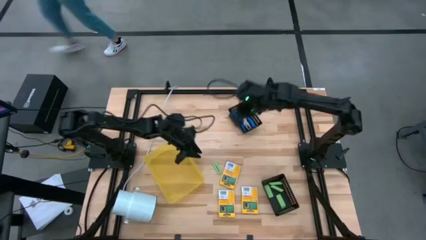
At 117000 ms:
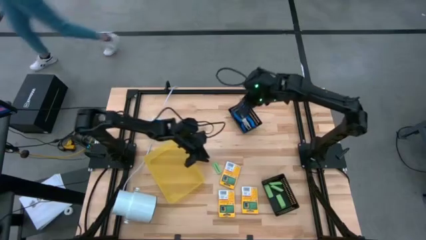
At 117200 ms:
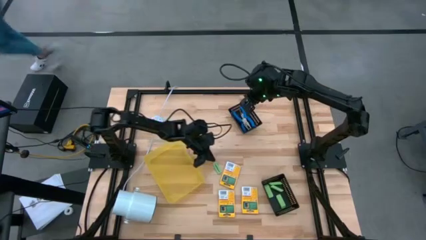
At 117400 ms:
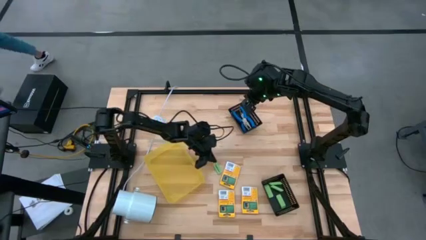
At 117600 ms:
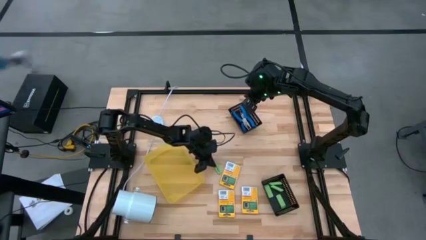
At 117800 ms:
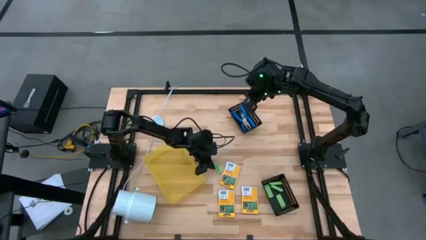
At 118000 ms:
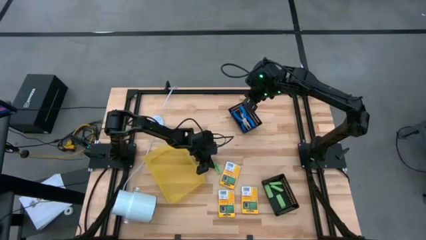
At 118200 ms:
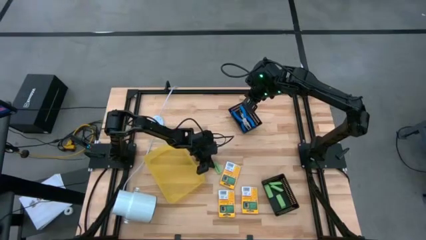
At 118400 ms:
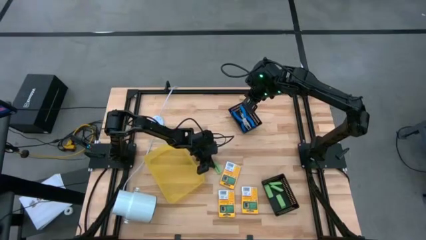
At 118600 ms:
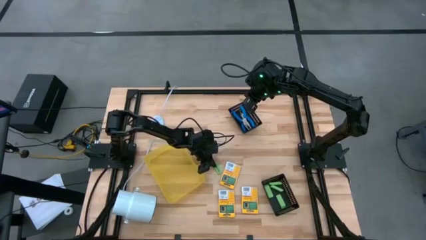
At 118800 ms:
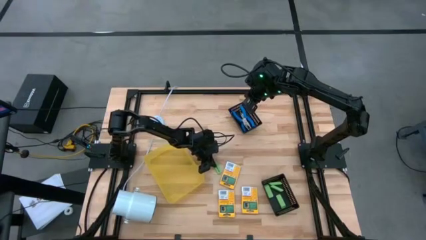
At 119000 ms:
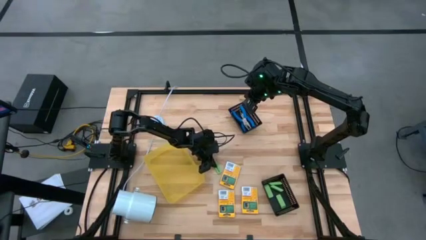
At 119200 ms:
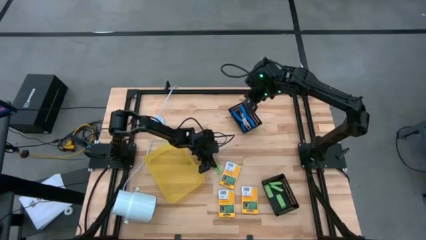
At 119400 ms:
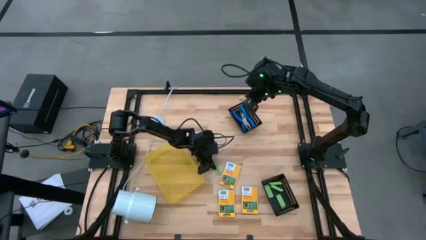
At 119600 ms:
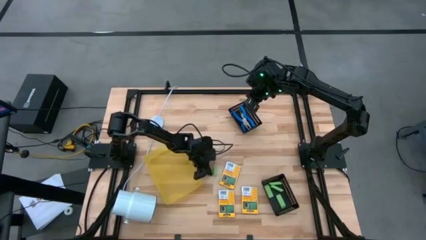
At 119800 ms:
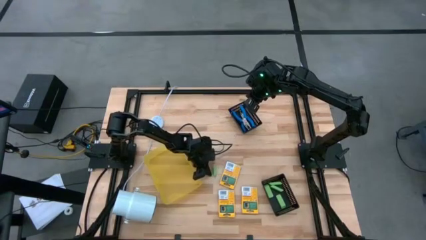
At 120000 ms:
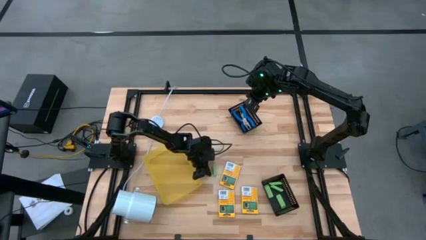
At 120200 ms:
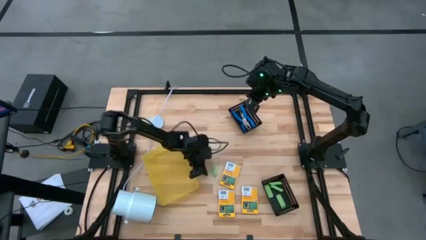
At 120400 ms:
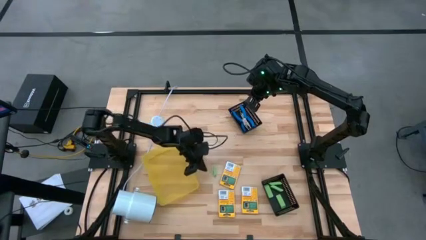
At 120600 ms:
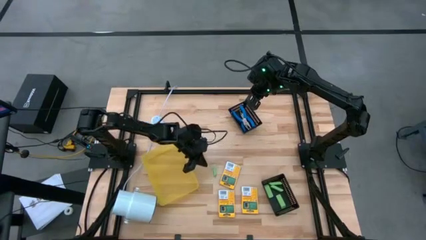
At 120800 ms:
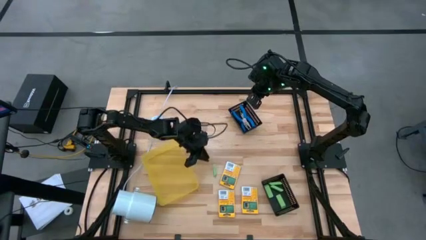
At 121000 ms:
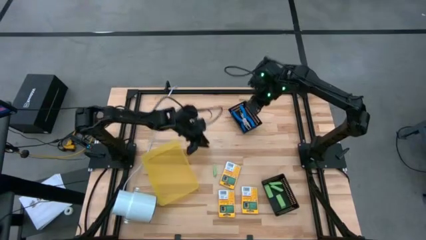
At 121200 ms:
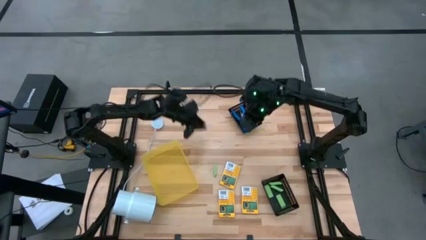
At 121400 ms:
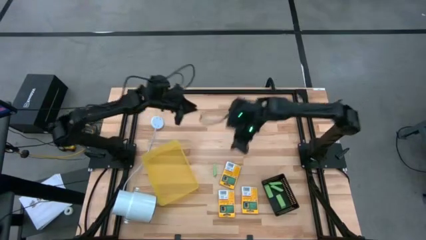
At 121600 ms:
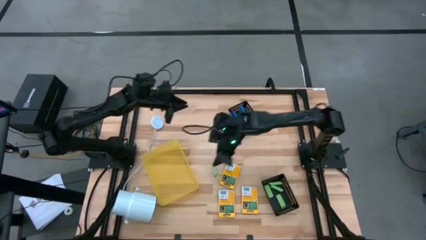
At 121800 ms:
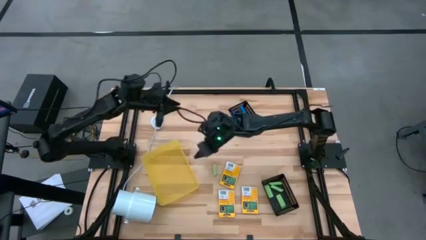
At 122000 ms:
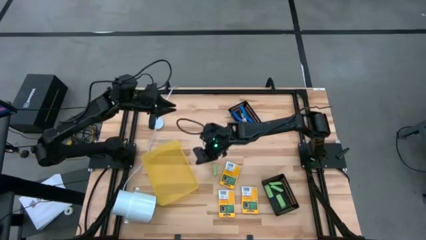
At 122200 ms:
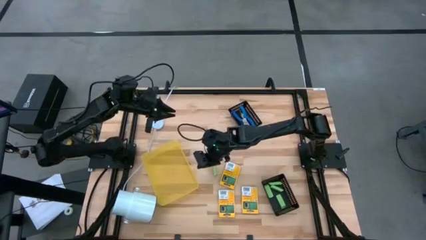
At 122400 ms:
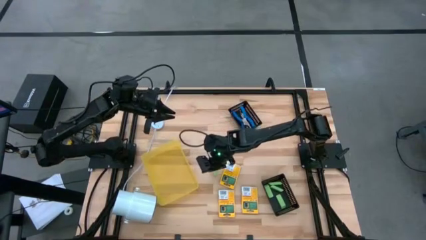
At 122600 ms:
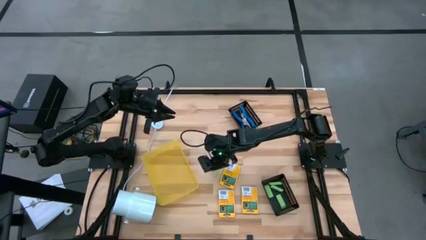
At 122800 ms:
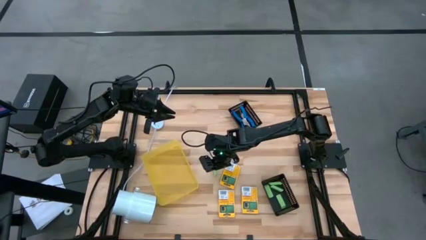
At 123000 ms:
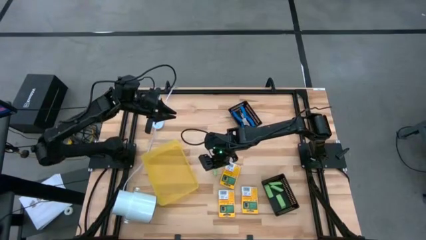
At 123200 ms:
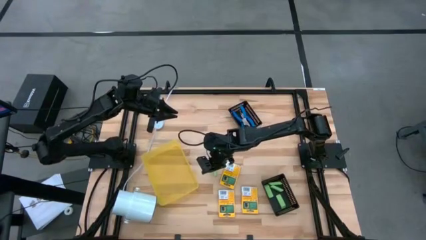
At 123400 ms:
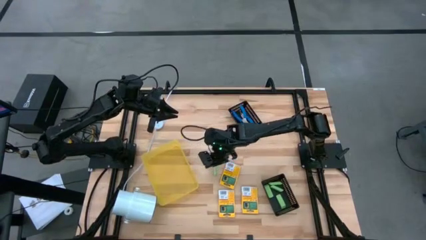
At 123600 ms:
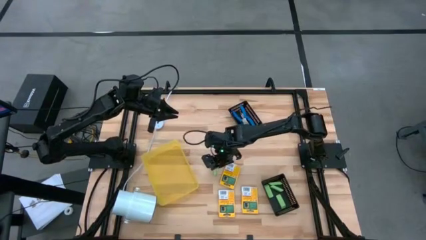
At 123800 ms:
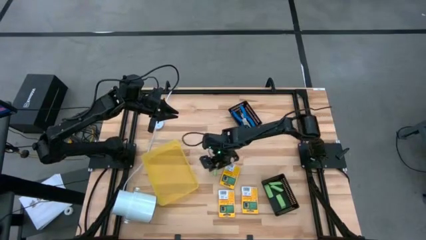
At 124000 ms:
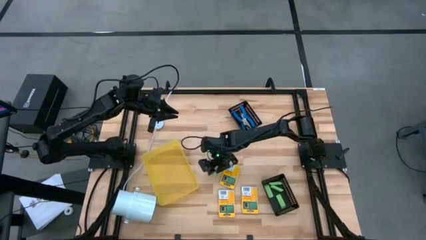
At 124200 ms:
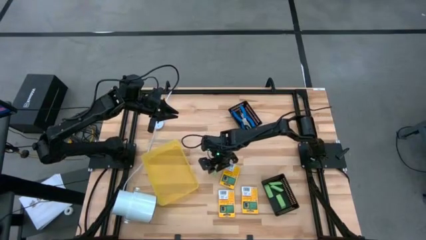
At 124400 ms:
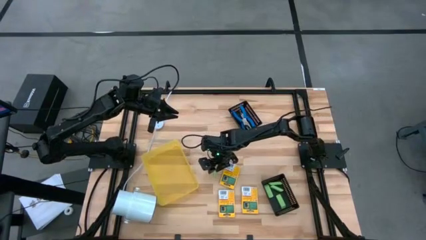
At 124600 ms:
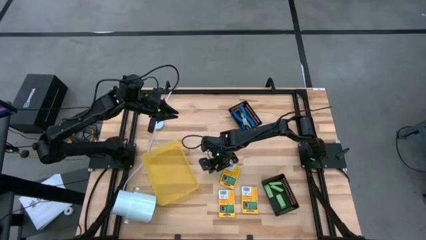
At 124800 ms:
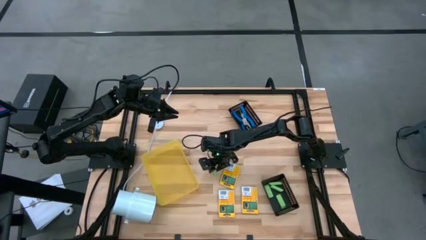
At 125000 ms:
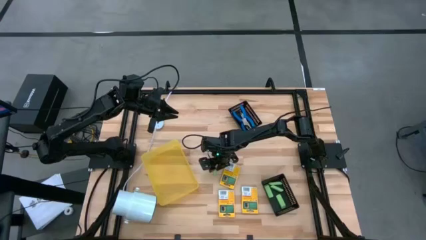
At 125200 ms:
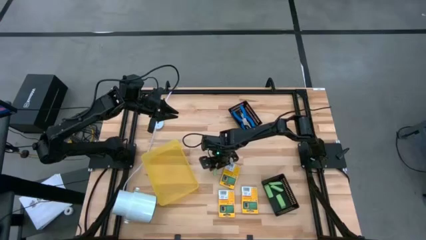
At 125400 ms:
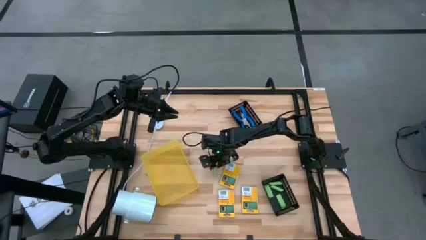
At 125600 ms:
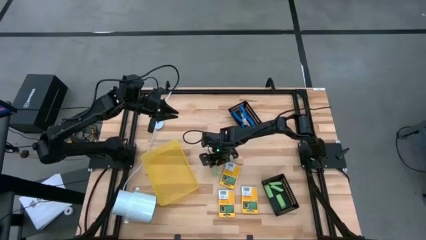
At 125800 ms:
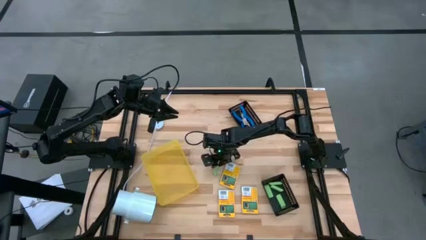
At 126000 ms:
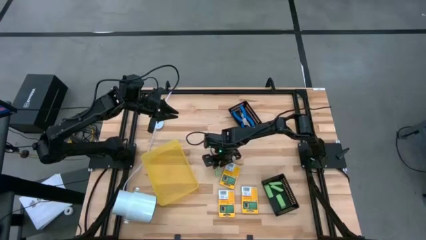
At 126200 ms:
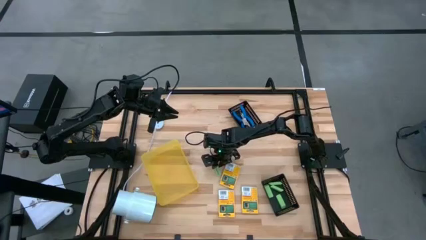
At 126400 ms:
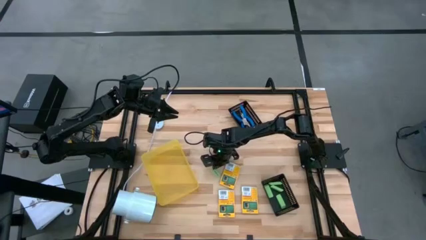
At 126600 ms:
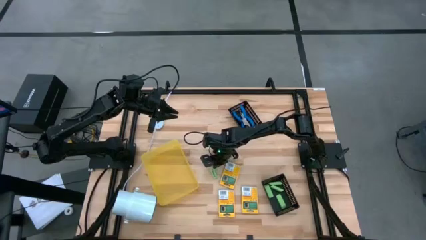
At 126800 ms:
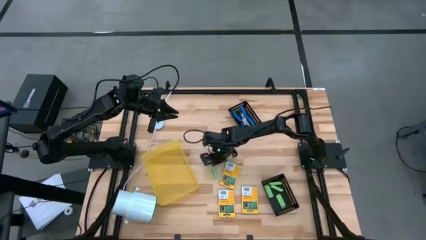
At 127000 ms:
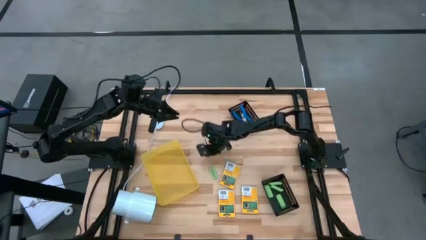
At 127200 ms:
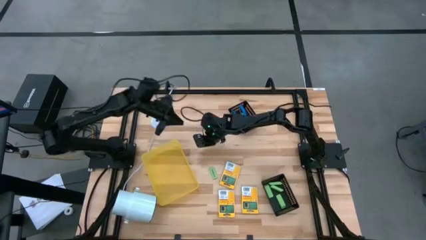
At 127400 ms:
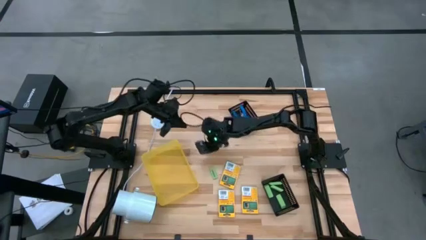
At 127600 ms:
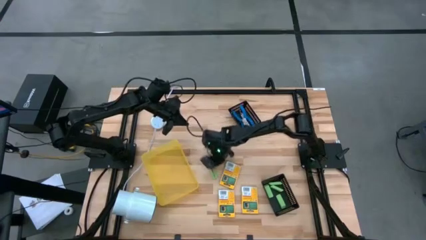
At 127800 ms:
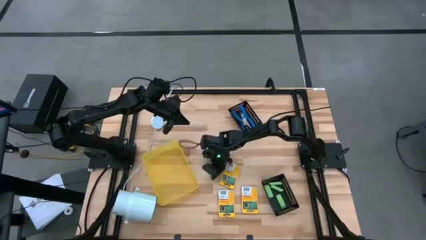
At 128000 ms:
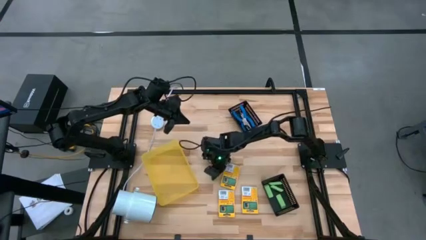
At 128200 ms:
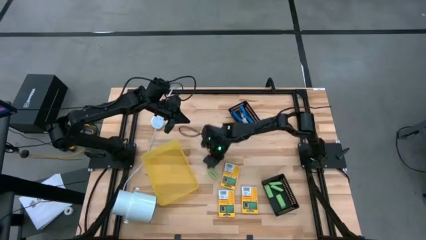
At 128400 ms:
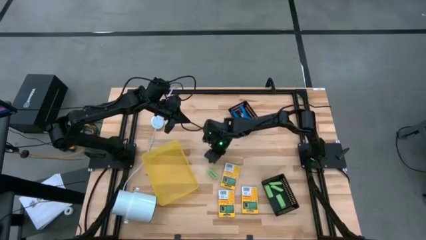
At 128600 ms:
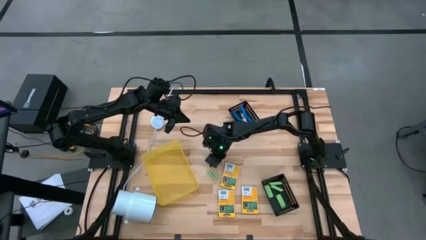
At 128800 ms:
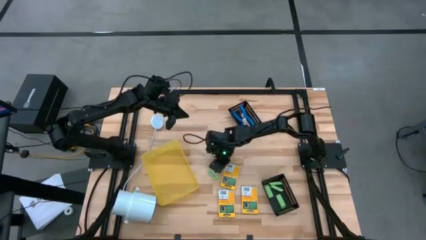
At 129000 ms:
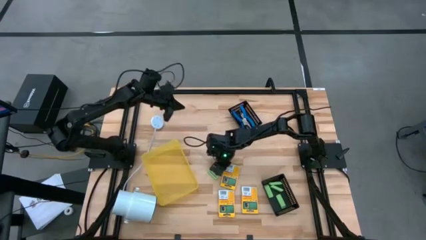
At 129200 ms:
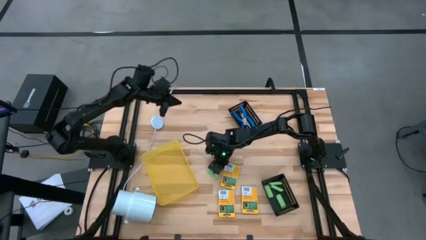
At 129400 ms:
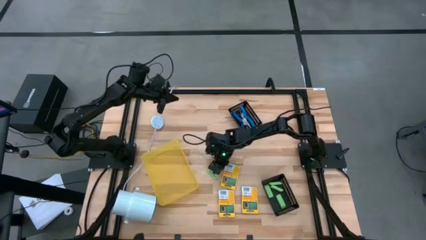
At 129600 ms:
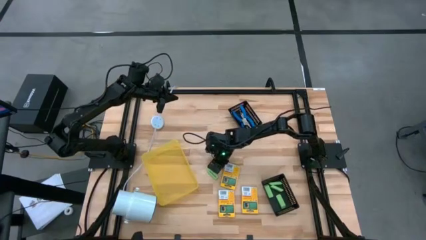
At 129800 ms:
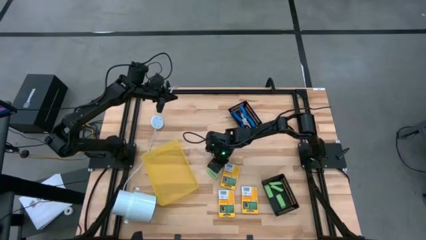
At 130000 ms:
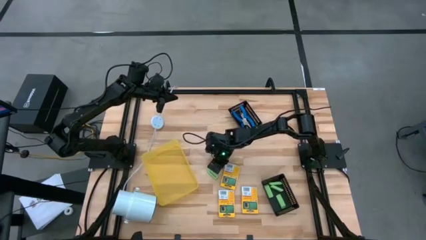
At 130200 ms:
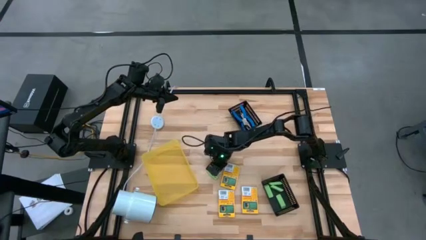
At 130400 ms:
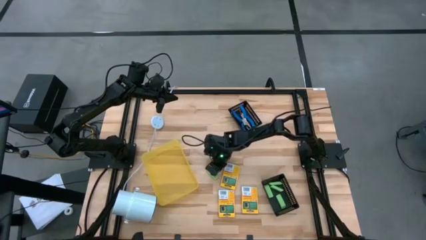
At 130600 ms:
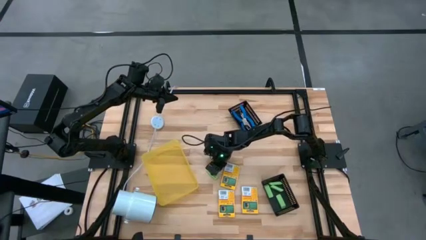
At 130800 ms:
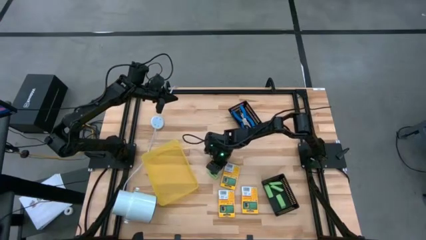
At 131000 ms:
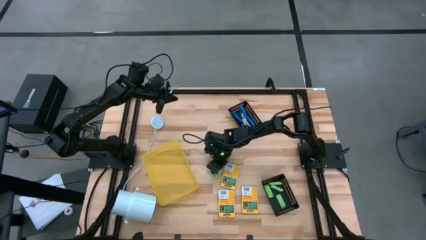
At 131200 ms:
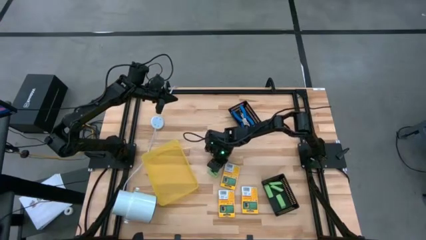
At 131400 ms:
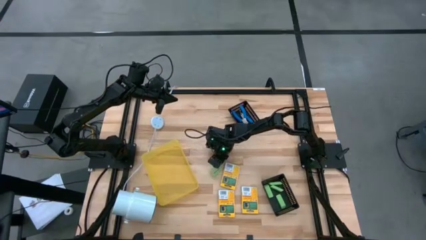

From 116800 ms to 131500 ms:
Task: Pick & Place School Supplies
Put the green eraser into the bottom black bin

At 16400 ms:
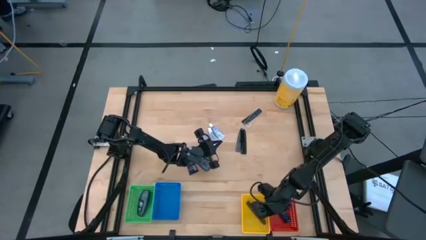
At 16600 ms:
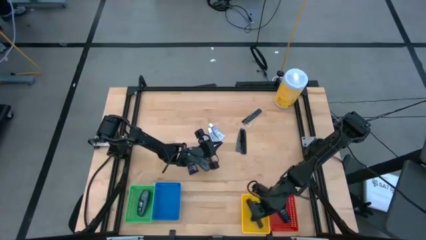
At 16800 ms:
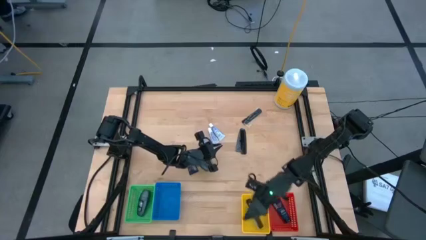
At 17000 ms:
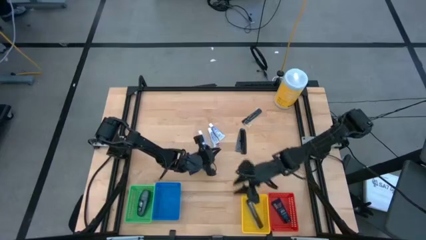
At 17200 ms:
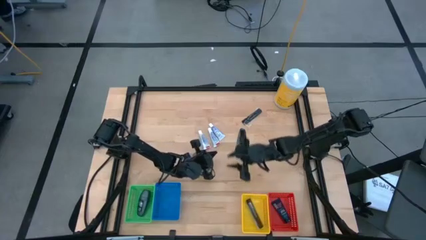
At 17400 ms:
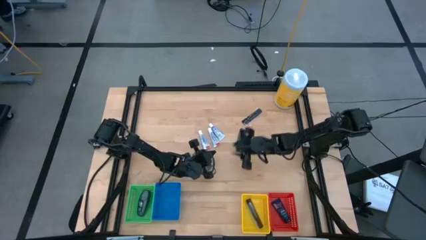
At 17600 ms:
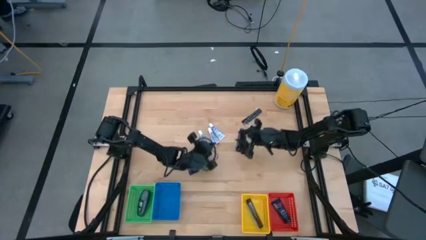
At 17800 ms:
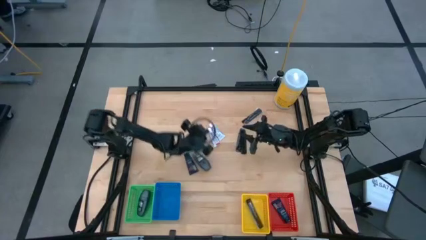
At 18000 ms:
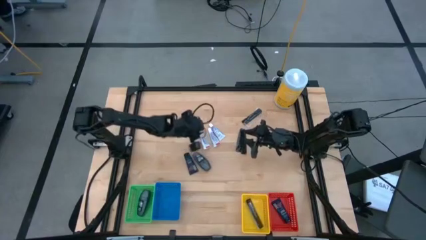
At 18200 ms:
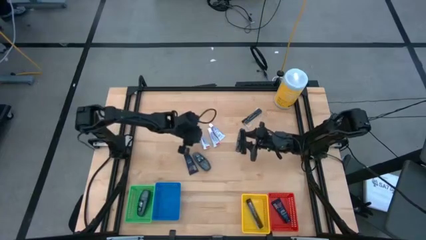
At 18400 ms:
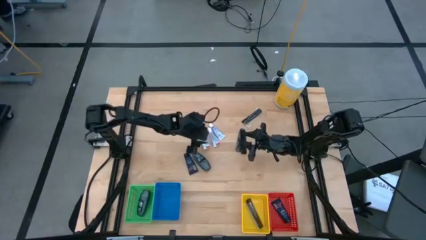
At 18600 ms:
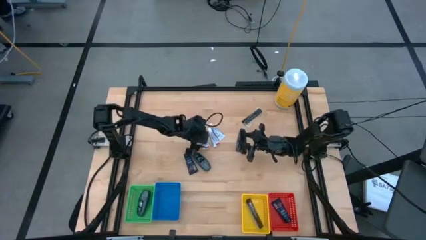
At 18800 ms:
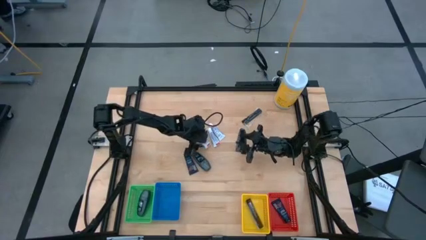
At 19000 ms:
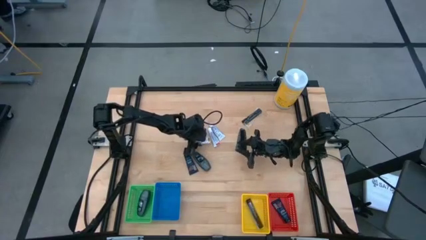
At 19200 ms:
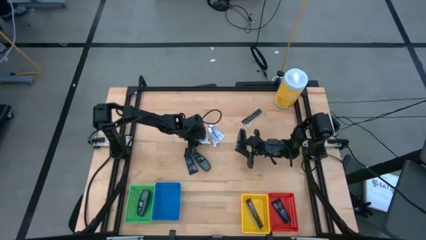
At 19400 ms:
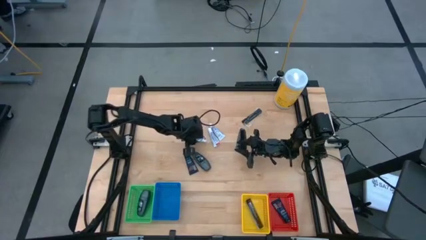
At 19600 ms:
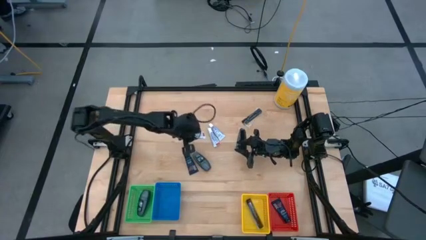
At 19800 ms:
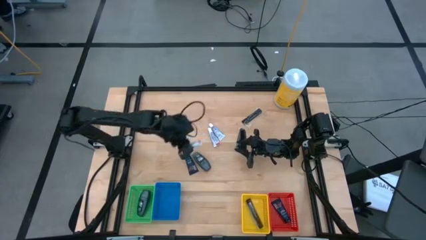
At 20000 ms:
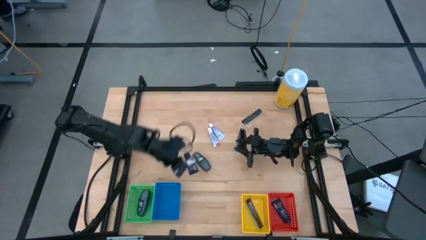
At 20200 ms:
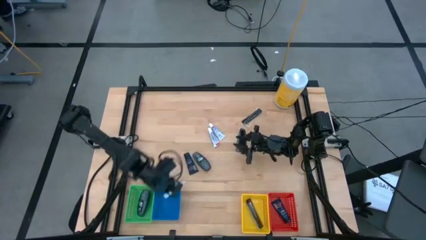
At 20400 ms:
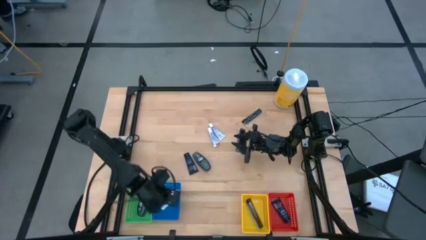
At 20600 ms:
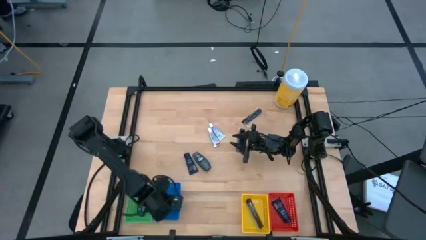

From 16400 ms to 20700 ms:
Task: Pick & Place Travel size toiletries
Put the white toothpaste into the blue bin
